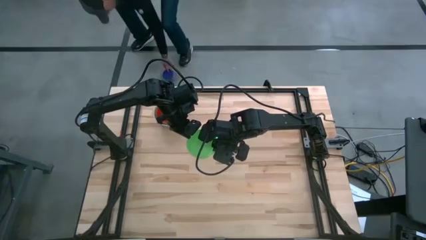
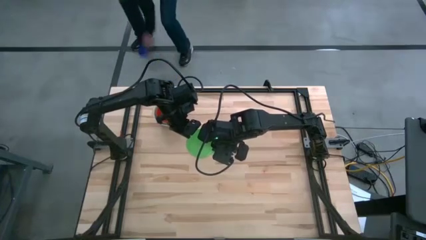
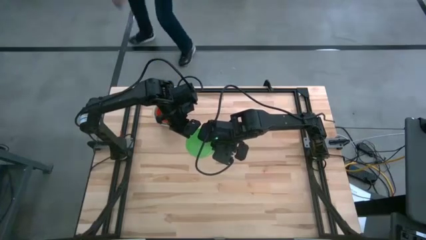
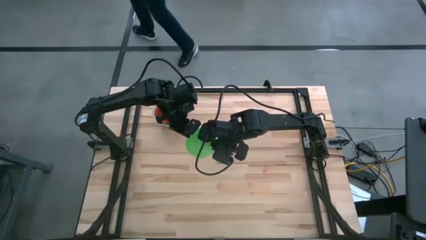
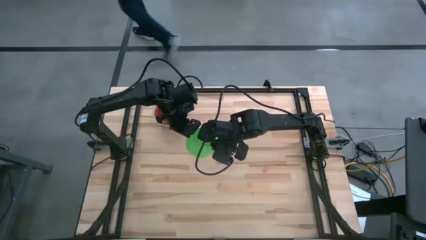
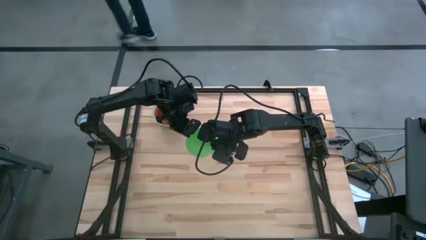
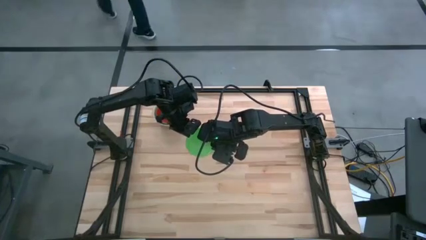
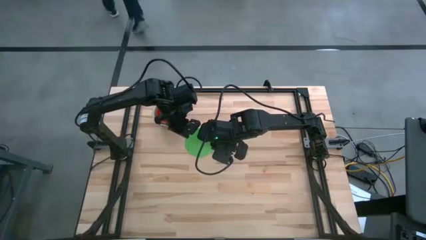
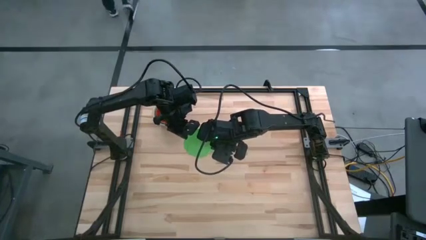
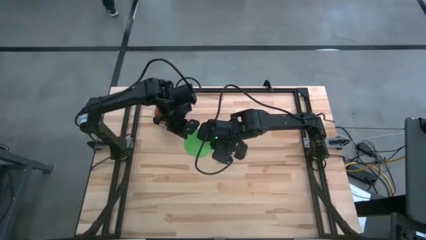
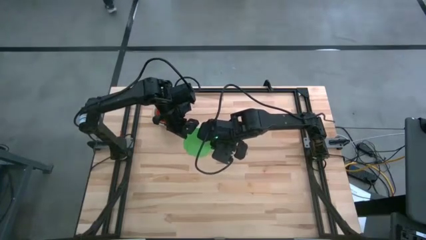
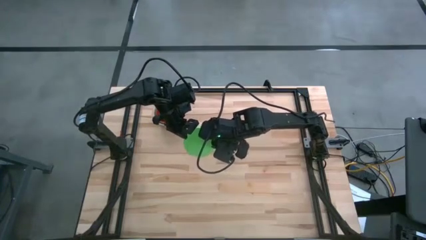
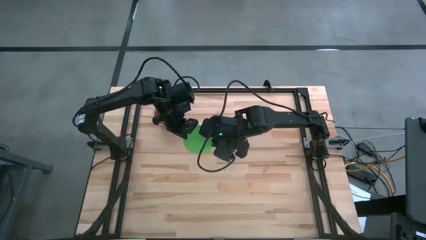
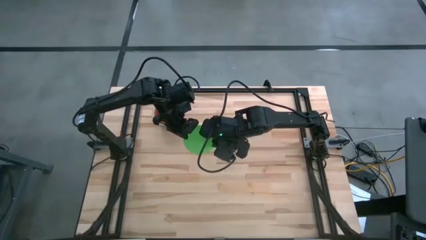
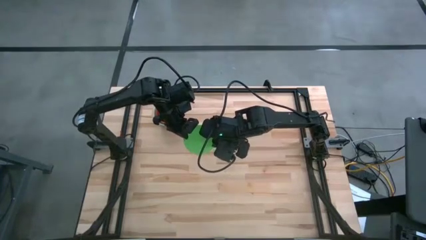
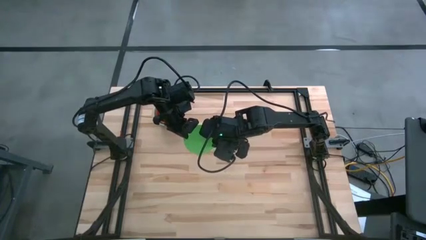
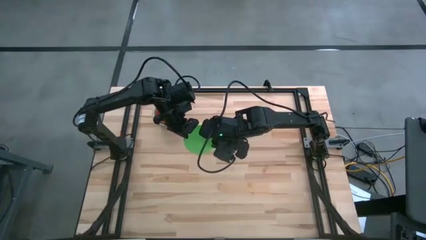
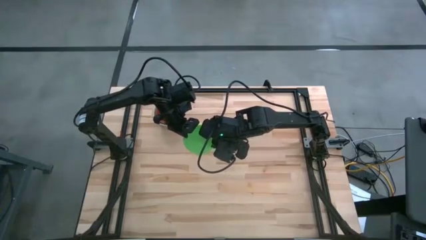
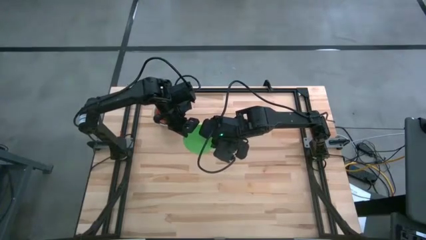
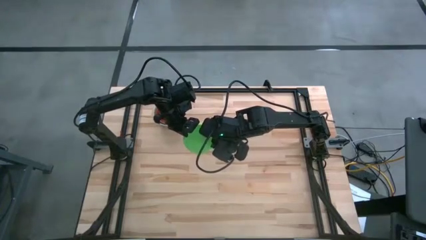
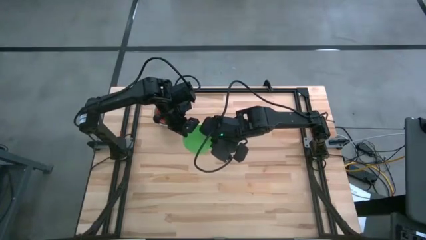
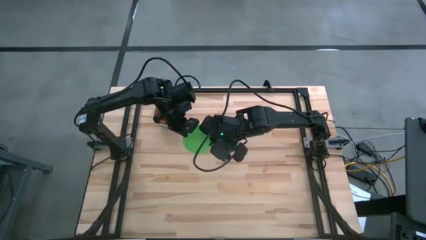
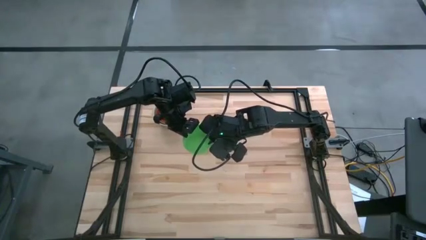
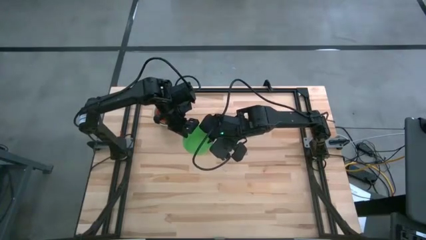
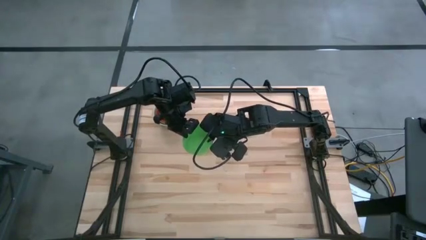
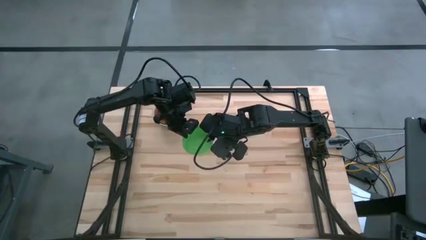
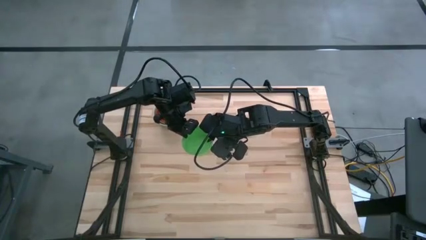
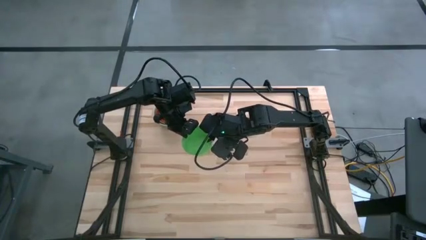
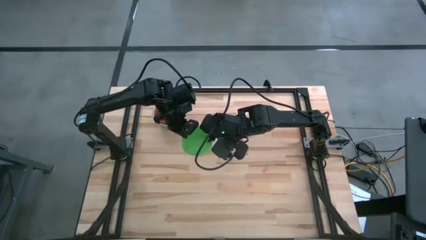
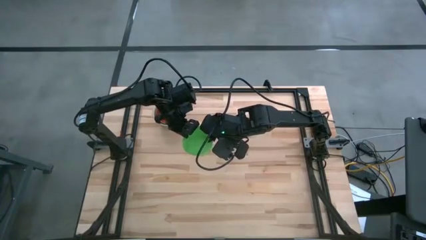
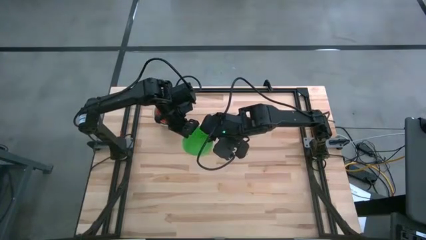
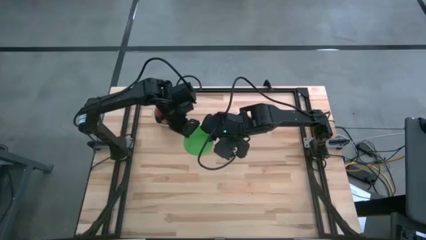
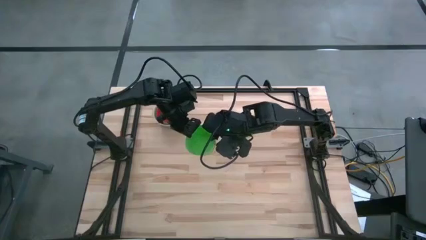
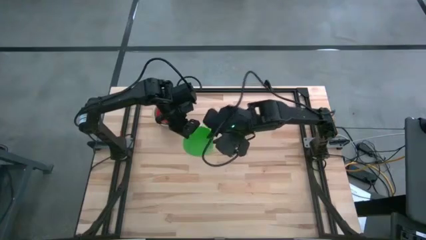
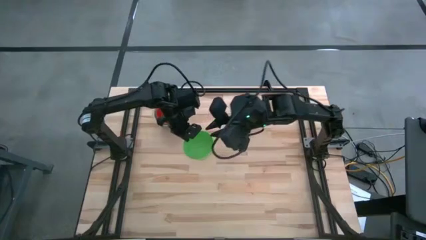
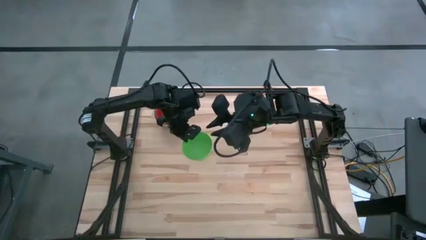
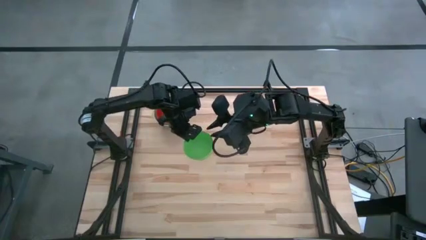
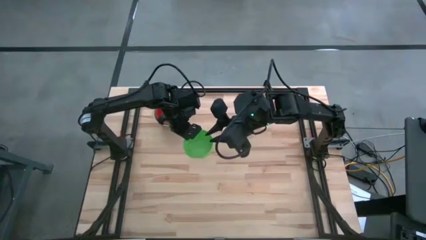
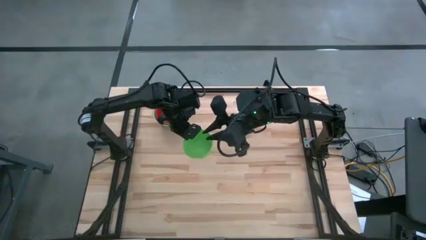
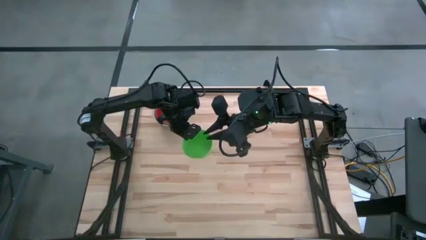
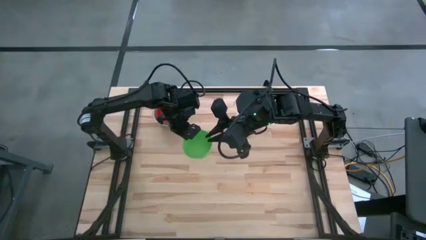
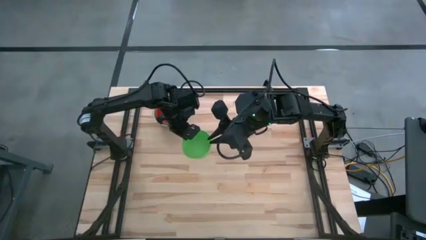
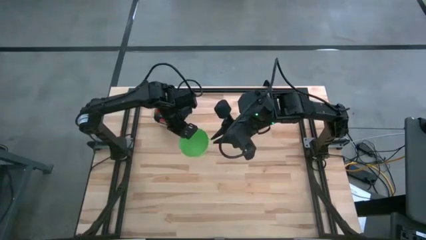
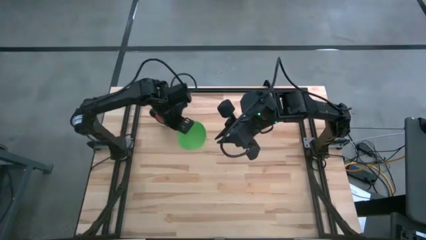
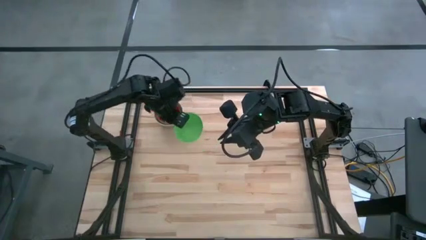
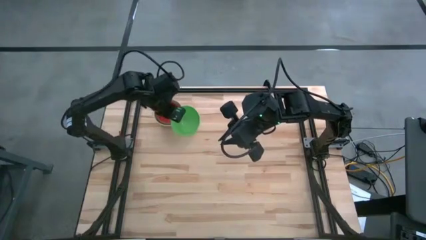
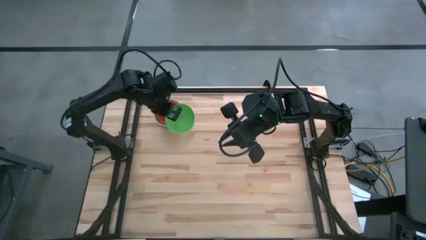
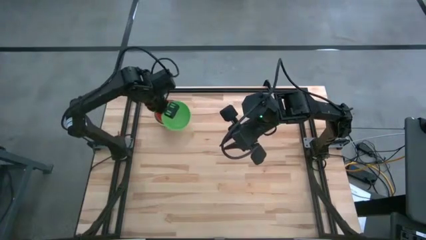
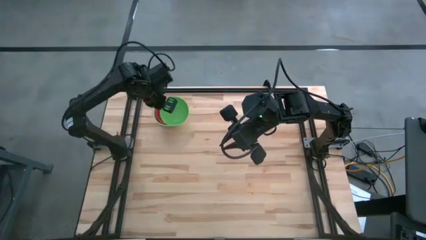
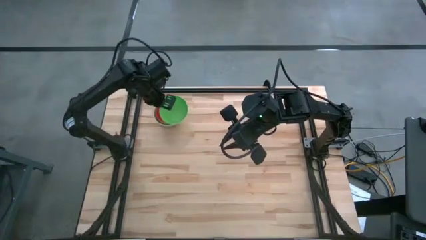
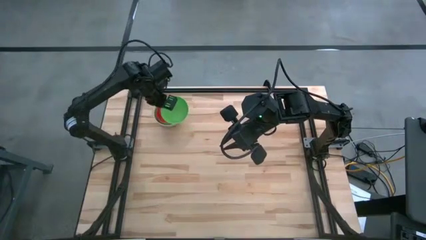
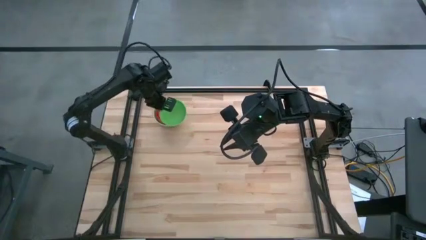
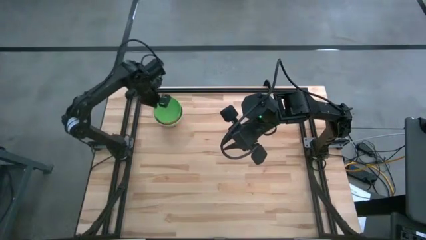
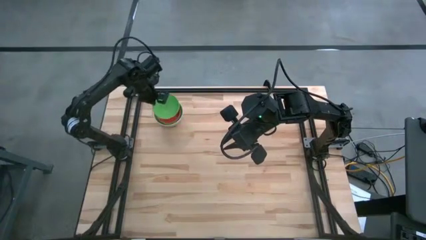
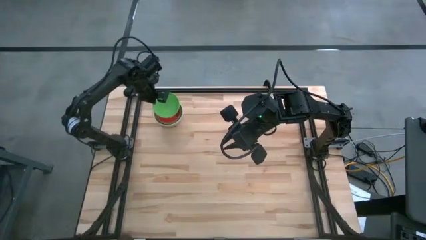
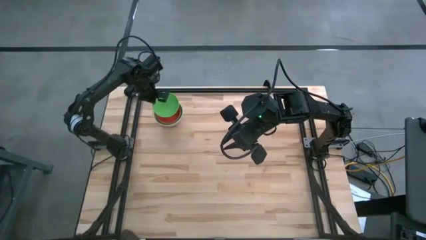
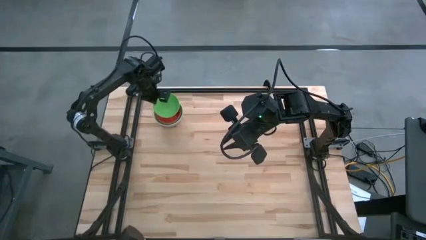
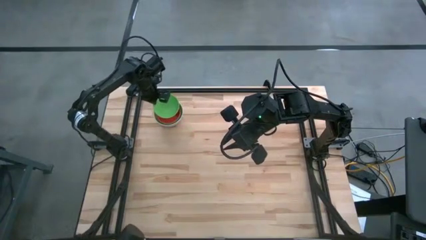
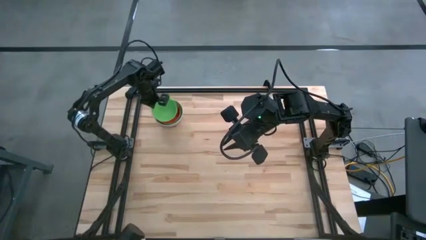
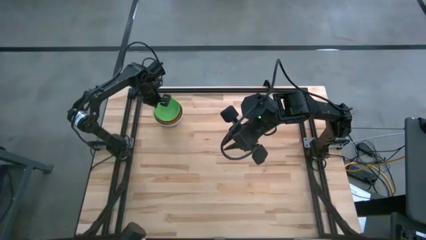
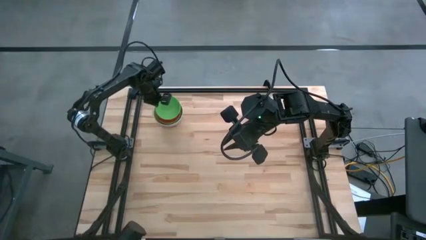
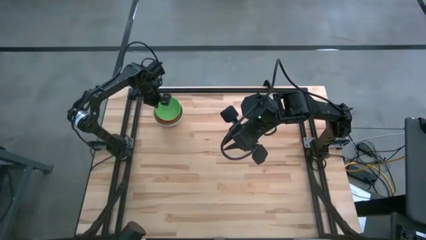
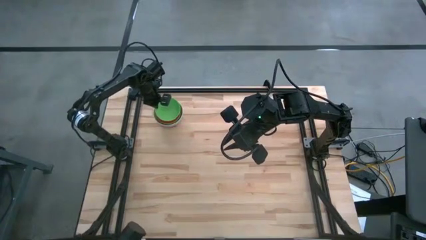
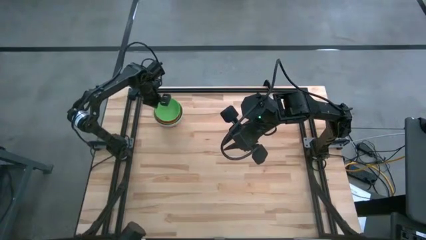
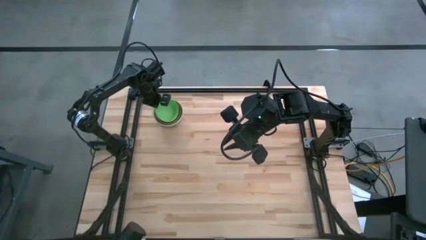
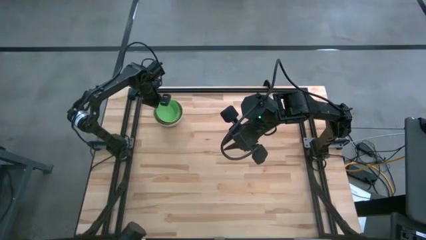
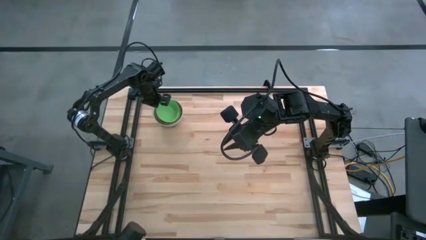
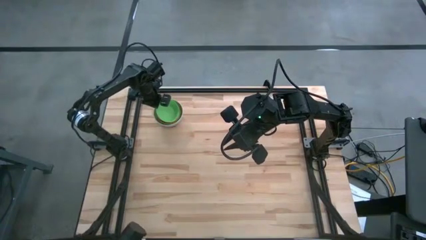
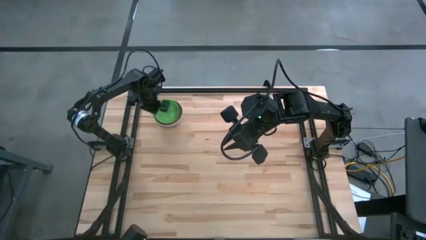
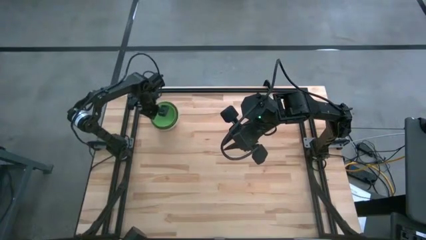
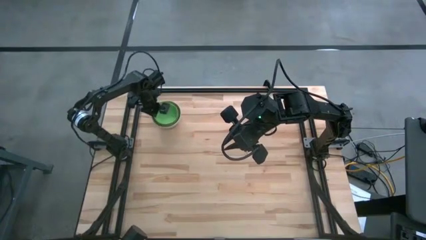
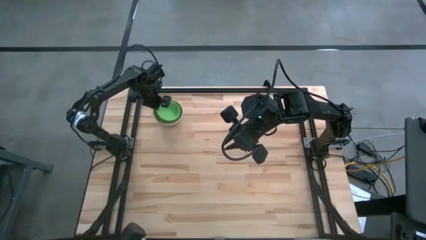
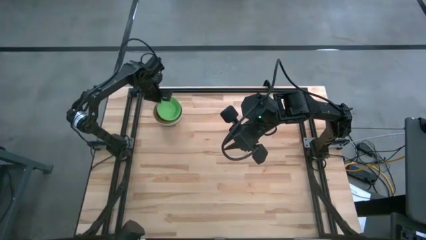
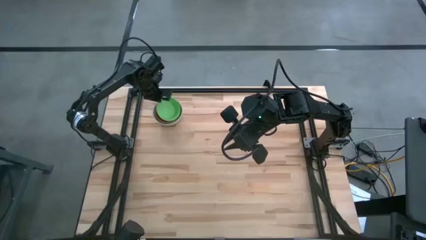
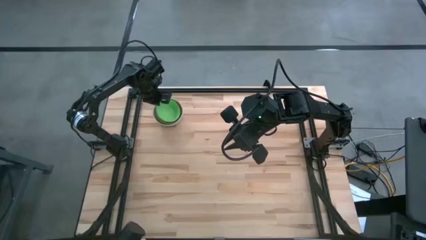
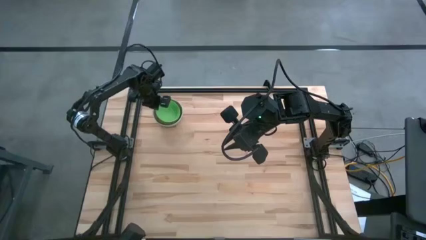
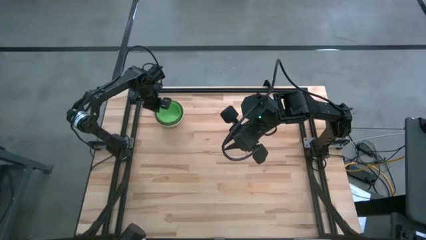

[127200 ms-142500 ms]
Stack the green bowl on the red bowl
